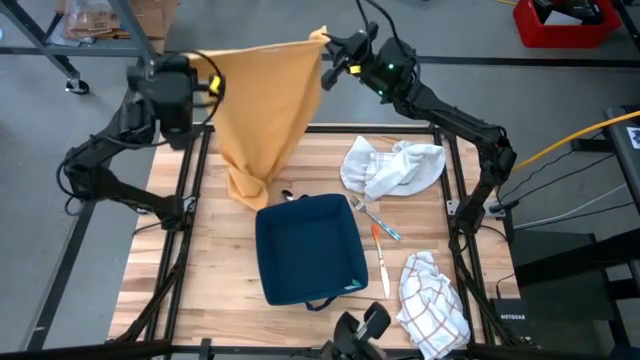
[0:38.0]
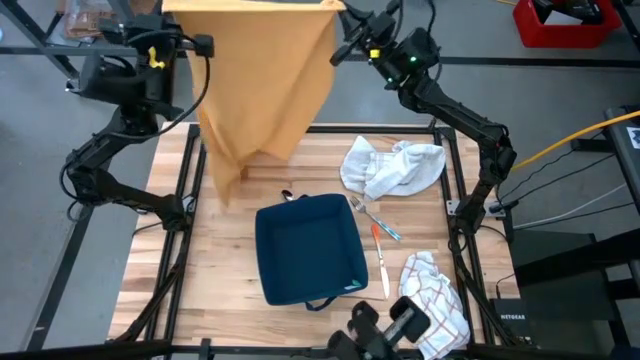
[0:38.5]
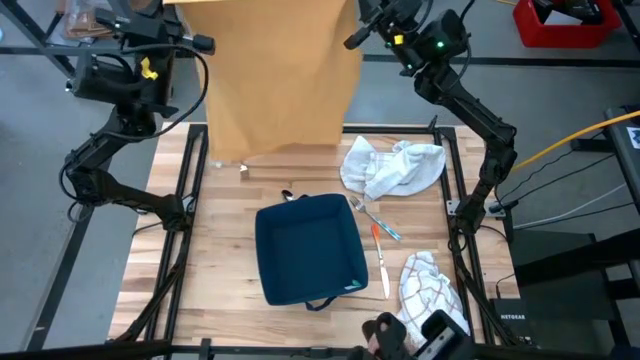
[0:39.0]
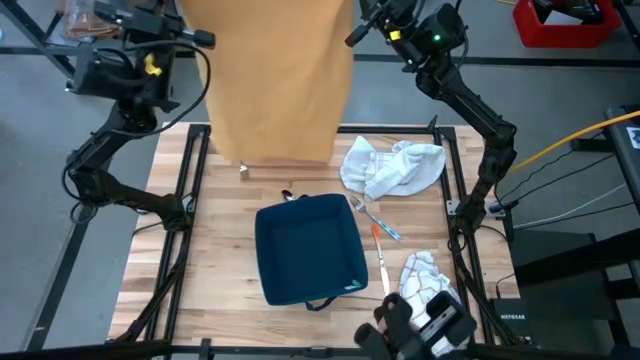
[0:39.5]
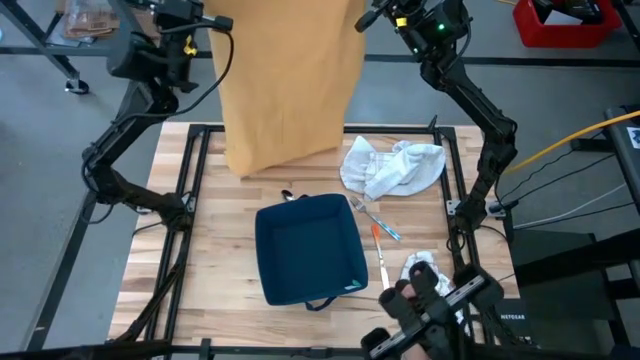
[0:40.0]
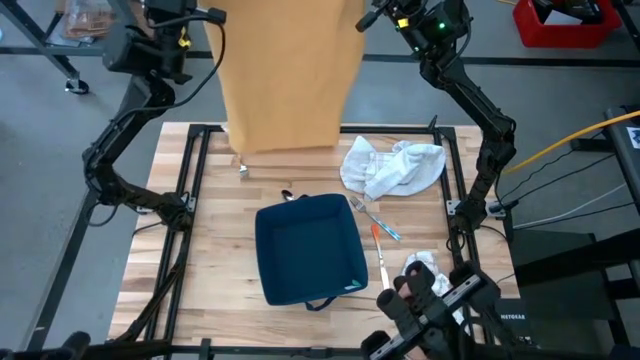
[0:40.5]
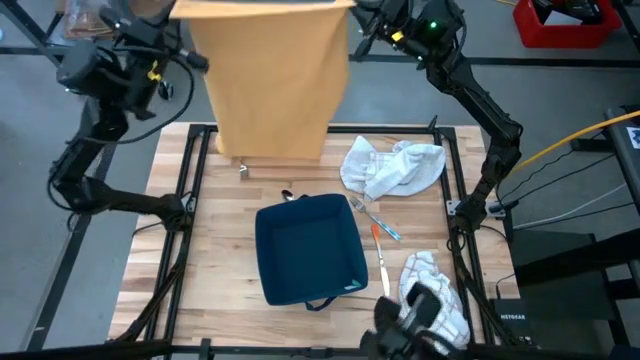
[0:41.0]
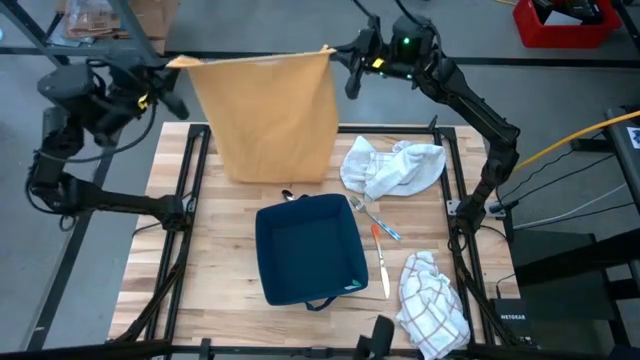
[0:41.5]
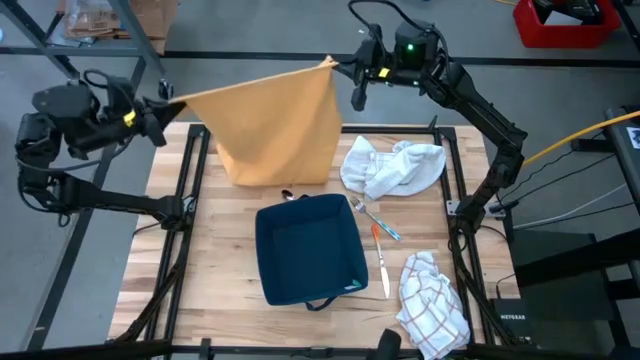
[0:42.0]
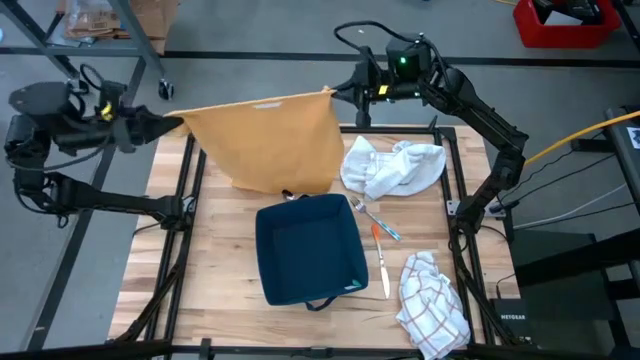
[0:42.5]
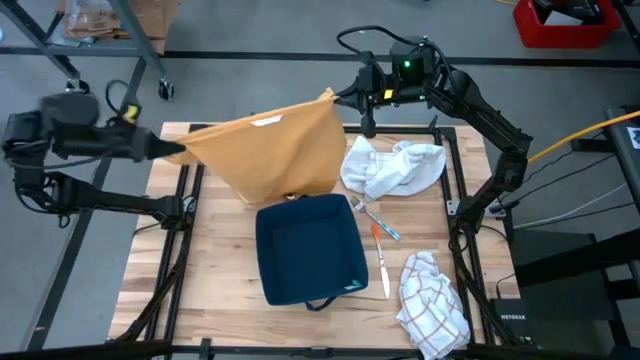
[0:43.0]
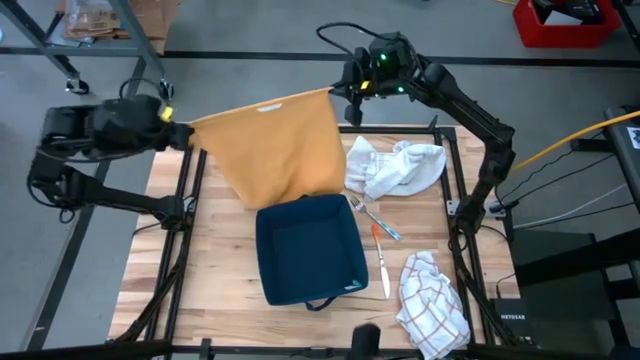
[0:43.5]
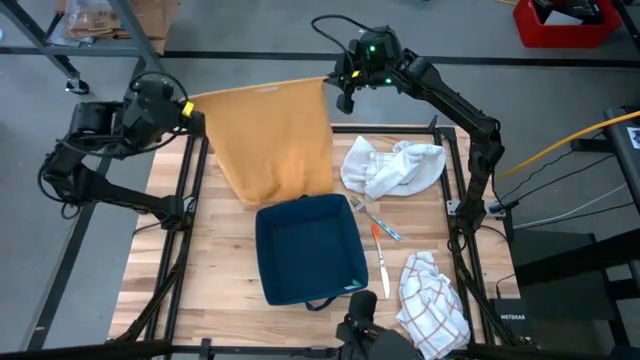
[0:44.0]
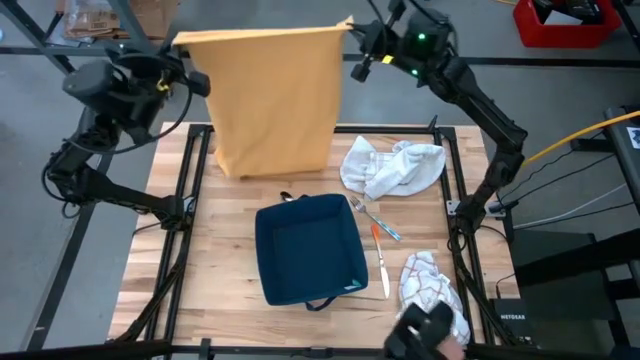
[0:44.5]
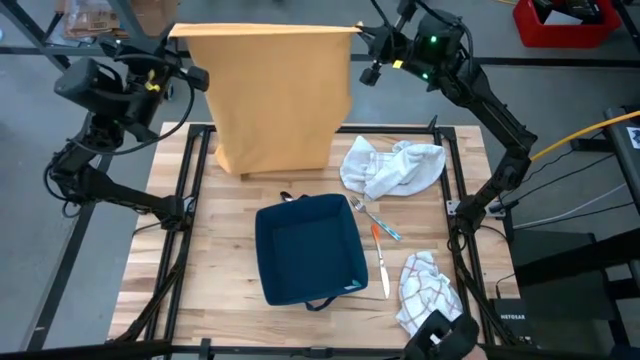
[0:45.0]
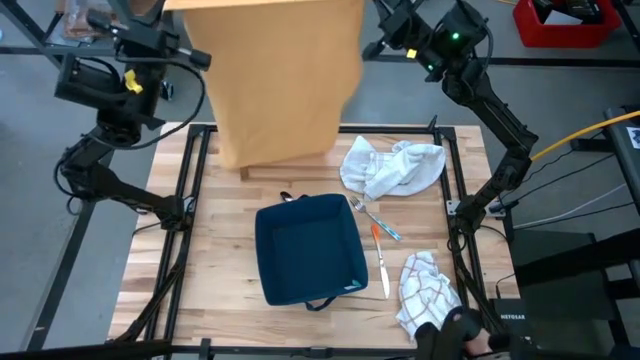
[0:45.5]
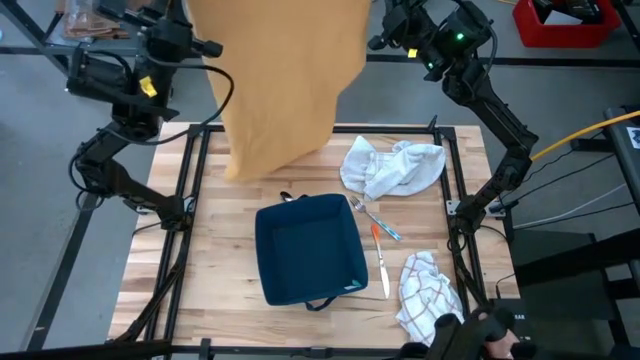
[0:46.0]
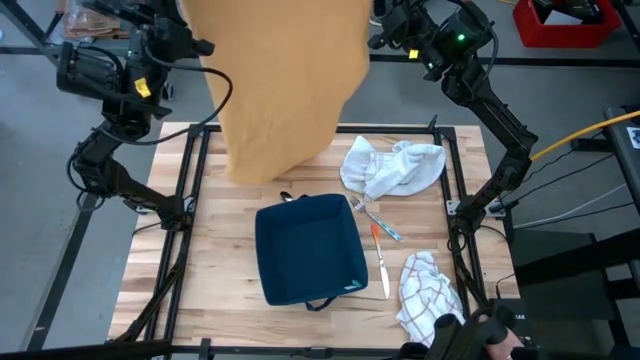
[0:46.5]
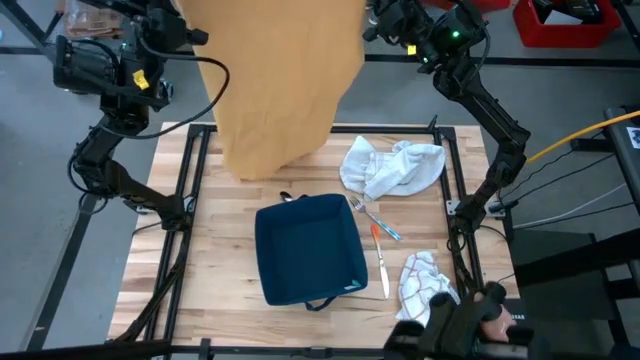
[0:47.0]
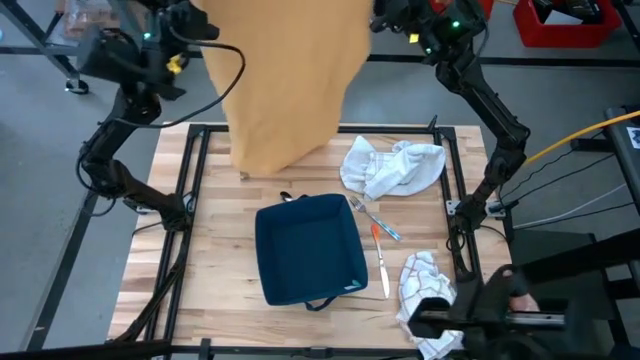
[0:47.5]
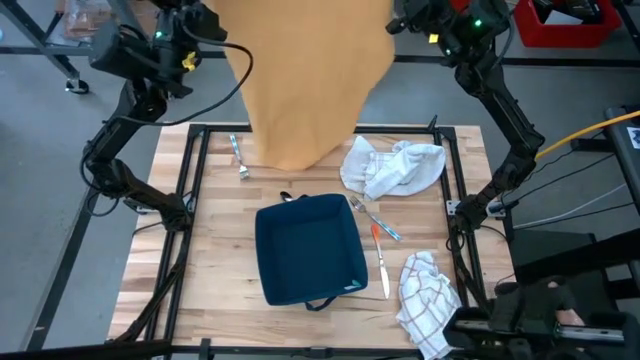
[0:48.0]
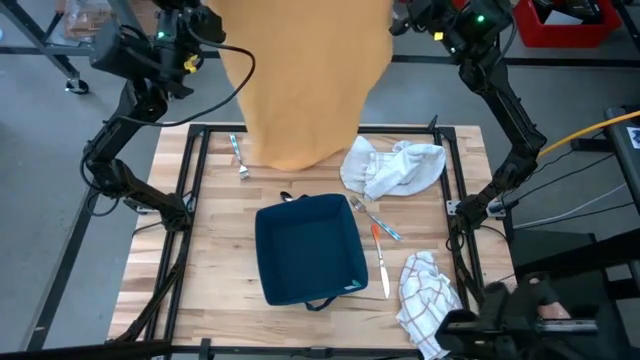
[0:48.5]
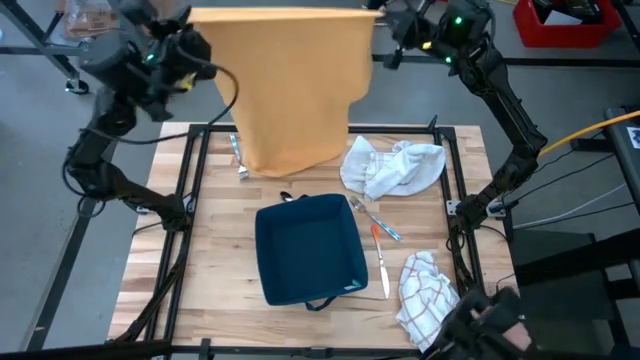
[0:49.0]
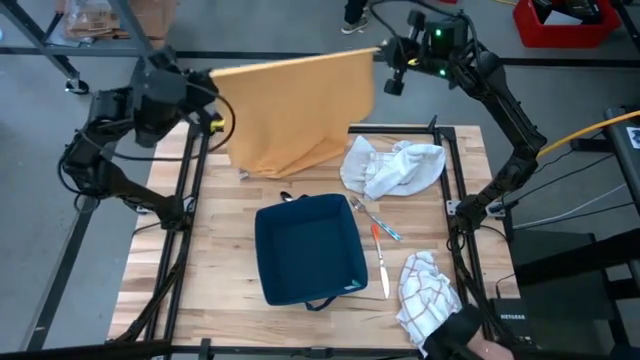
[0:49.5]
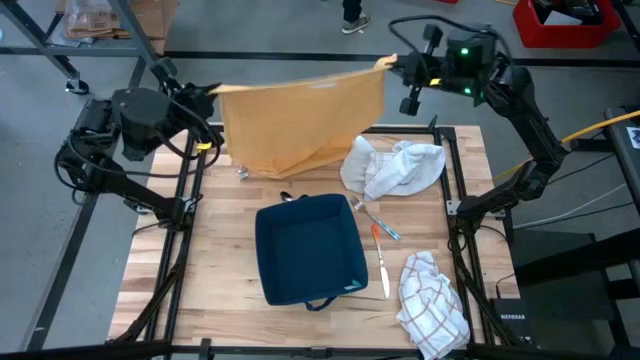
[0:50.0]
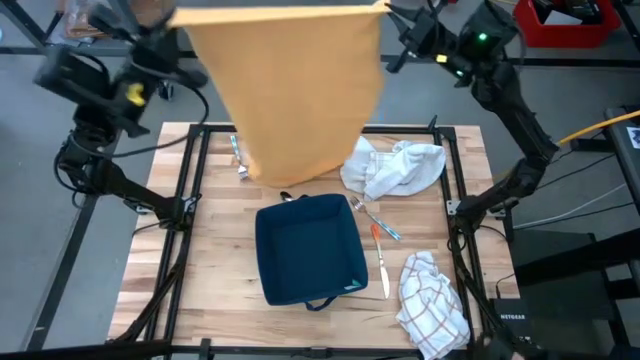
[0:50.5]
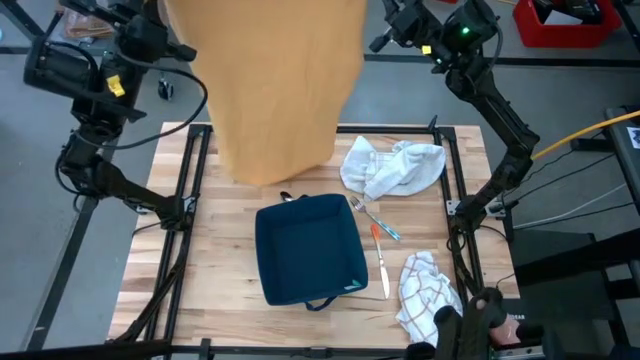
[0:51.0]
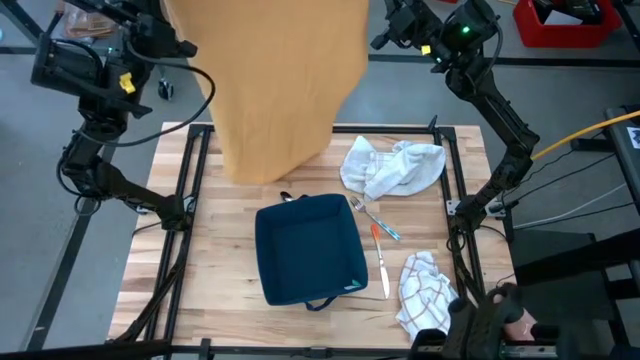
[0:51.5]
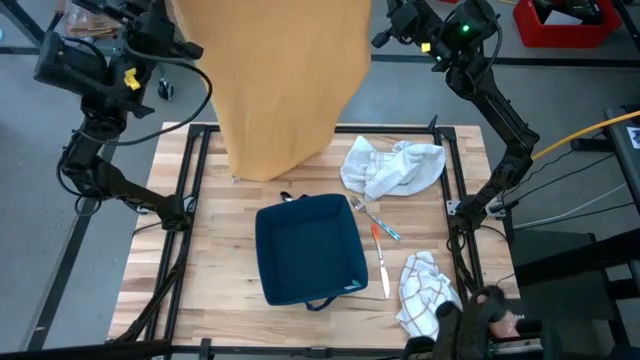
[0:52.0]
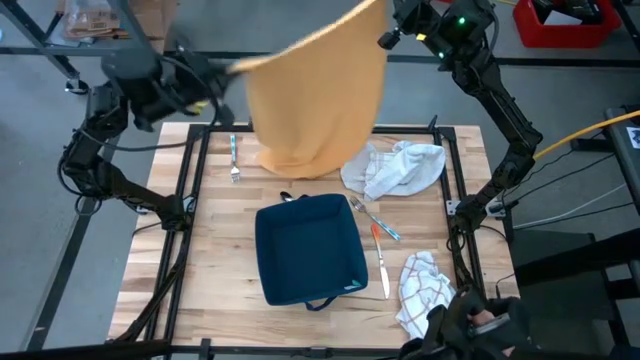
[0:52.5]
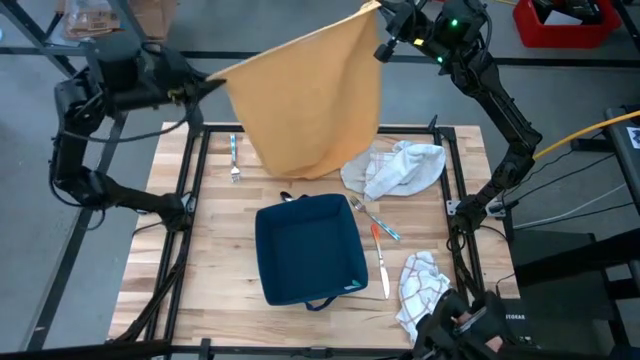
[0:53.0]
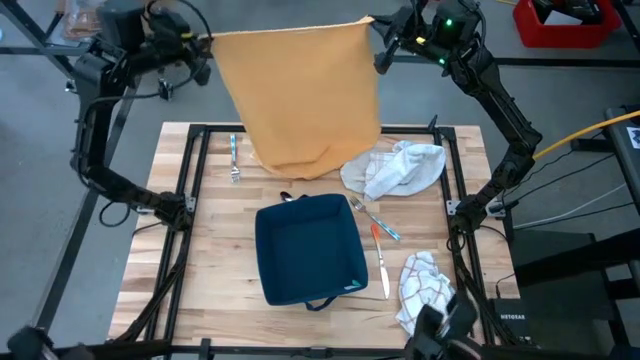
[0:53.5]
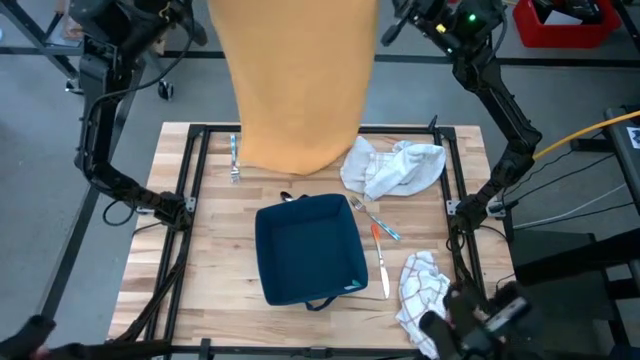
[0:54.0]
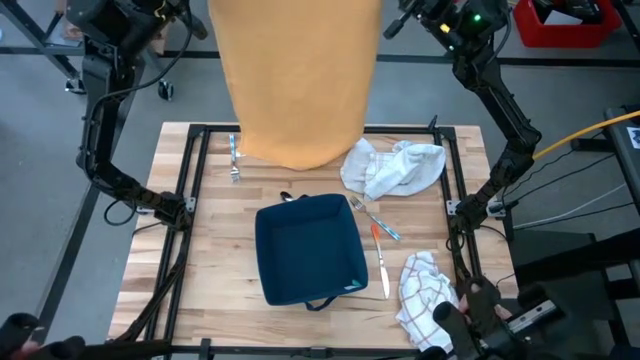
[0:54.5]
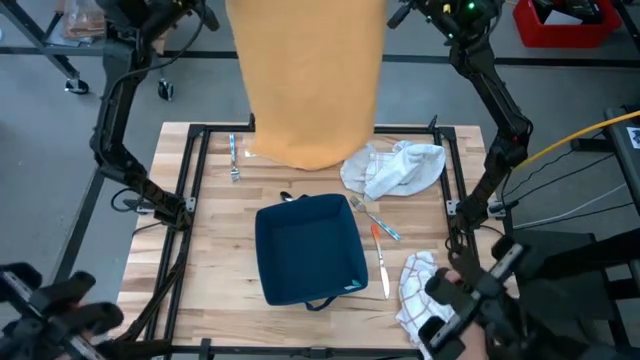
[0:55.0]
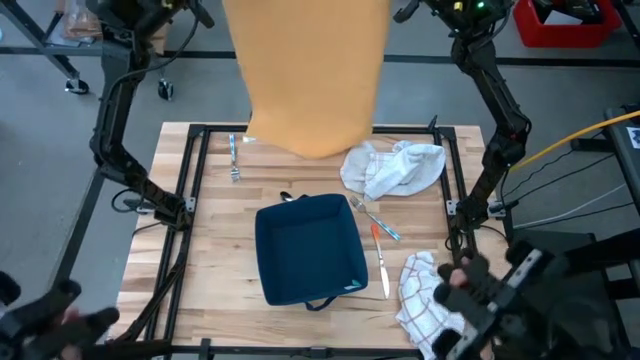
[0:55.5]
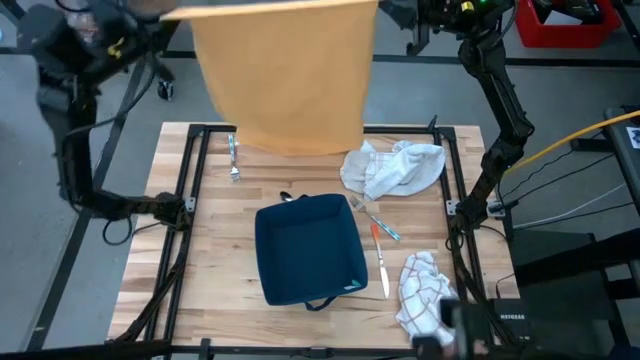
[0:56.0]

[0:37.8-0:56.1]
Task: Fold towel
Fold the yellow towel
